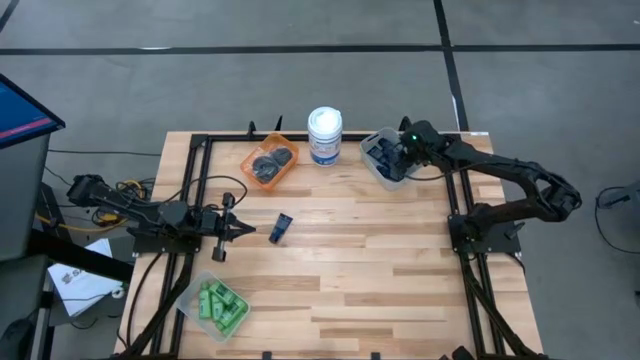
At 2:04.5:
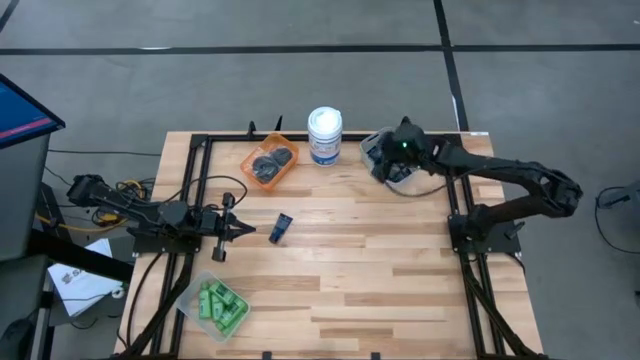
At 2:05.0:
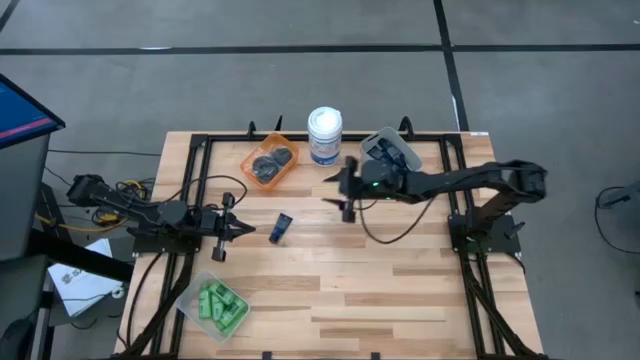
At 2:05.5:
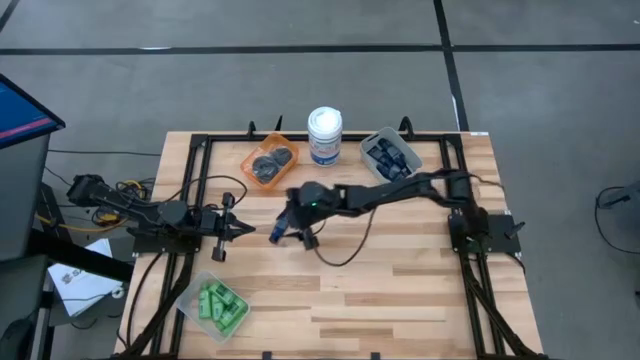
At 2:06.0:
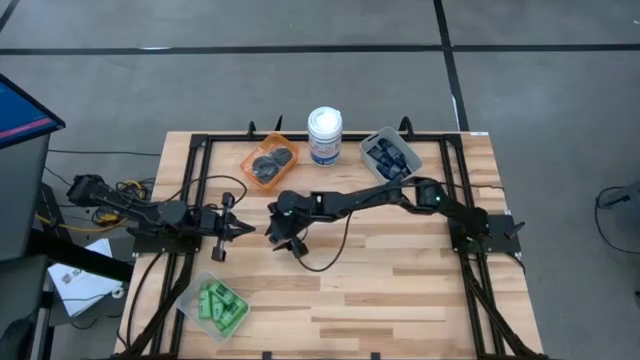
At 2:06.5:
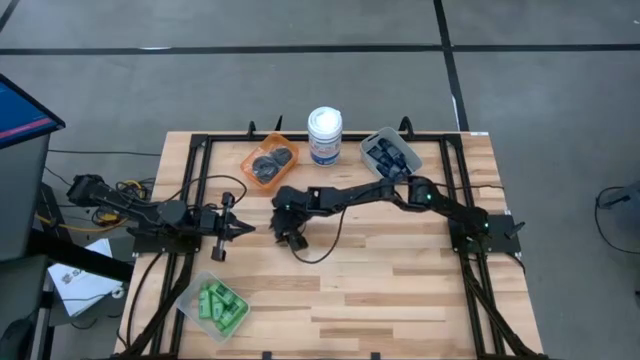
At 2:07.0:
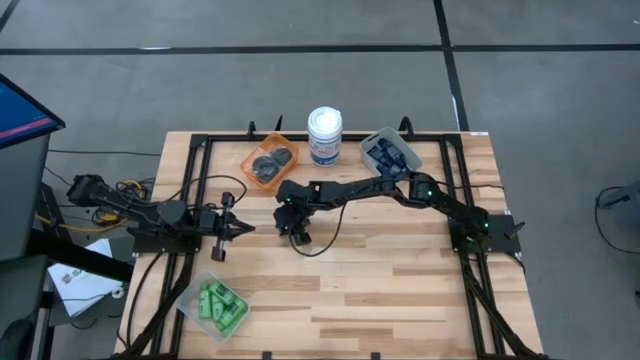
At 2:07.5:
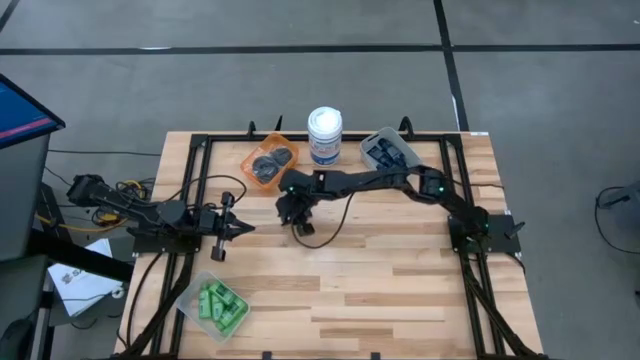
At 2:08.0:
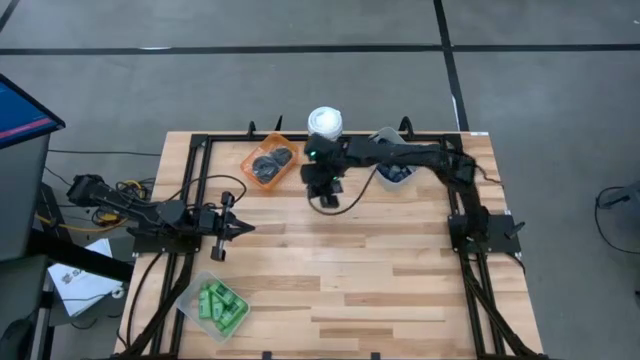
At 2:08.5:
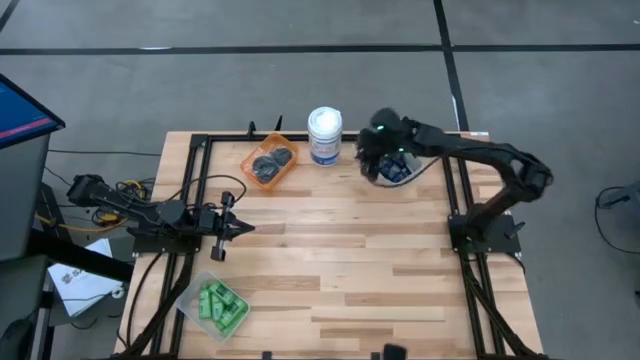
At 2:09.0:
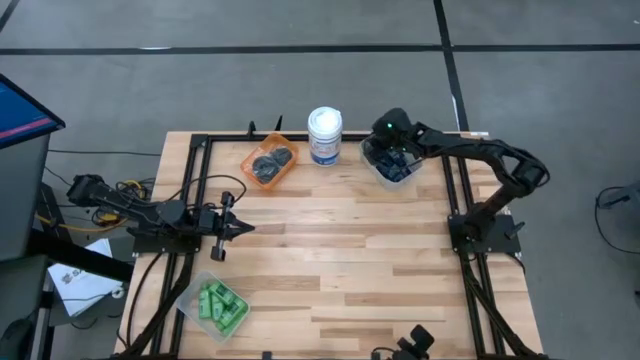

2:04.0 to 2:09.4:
Task: Pick & Place Travel size toiletries
Put the shaving cream into the gray bin

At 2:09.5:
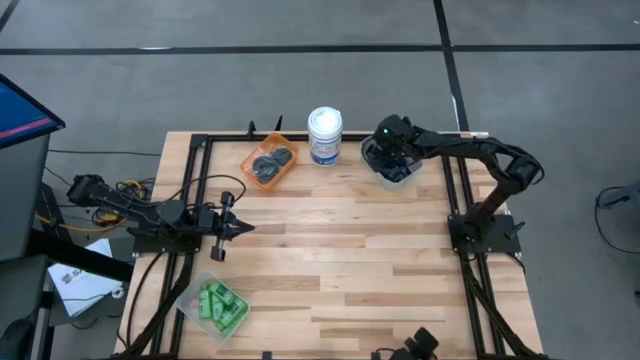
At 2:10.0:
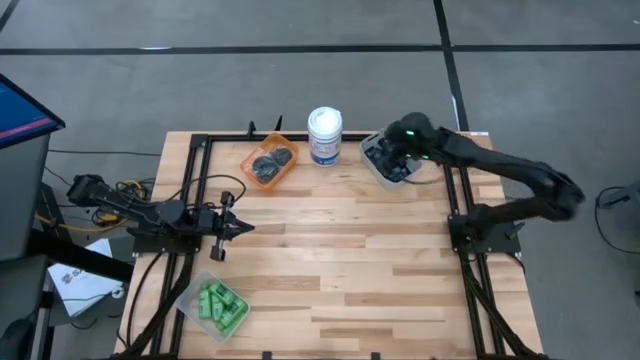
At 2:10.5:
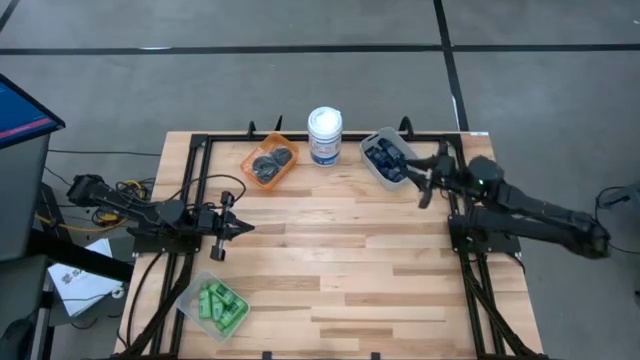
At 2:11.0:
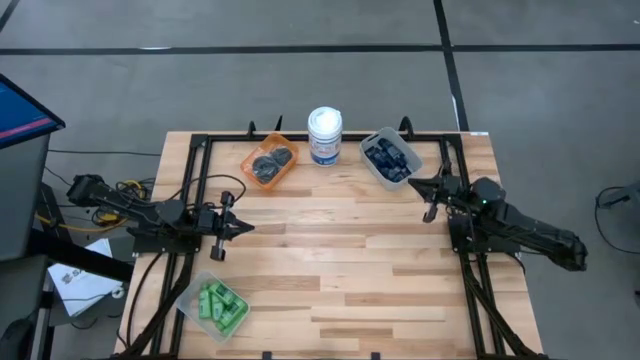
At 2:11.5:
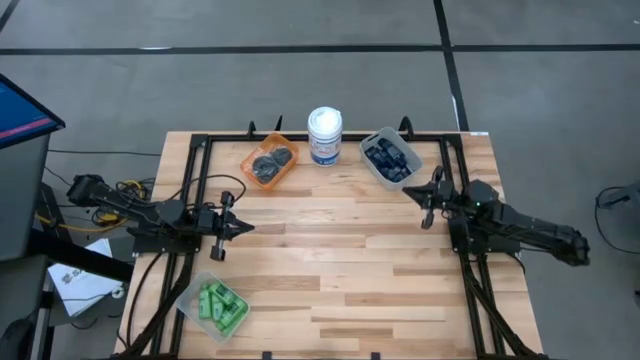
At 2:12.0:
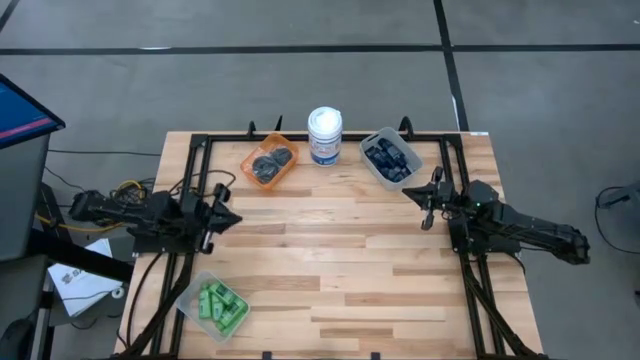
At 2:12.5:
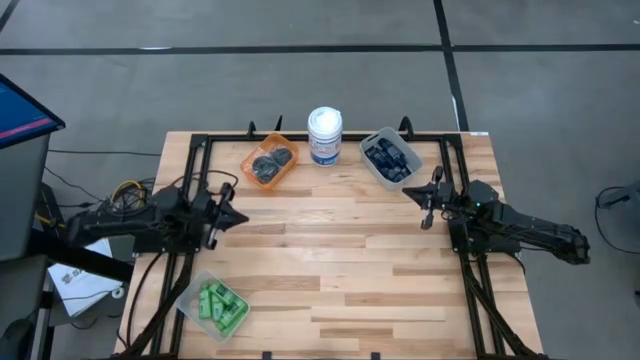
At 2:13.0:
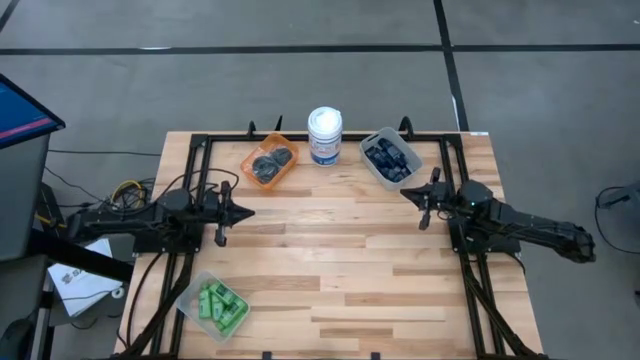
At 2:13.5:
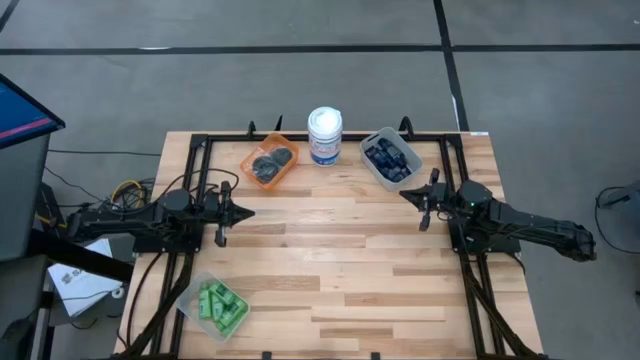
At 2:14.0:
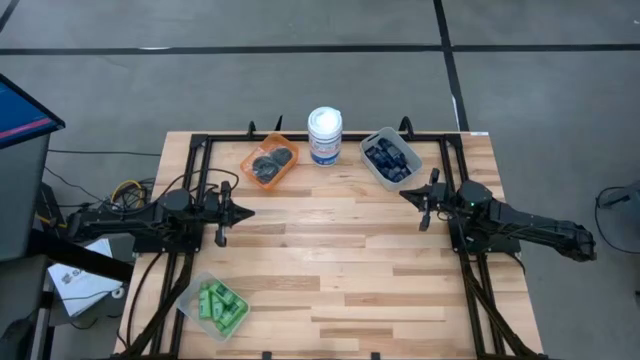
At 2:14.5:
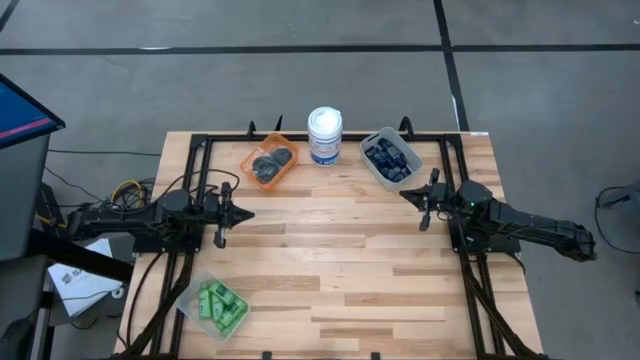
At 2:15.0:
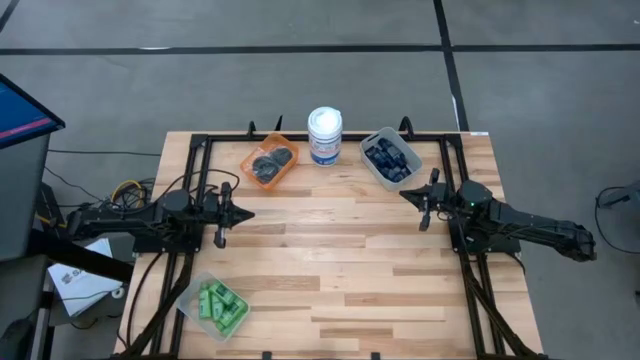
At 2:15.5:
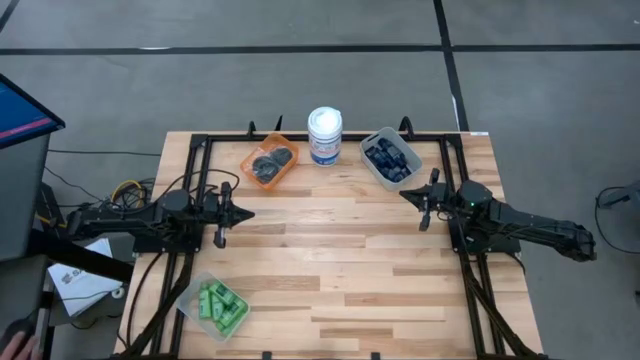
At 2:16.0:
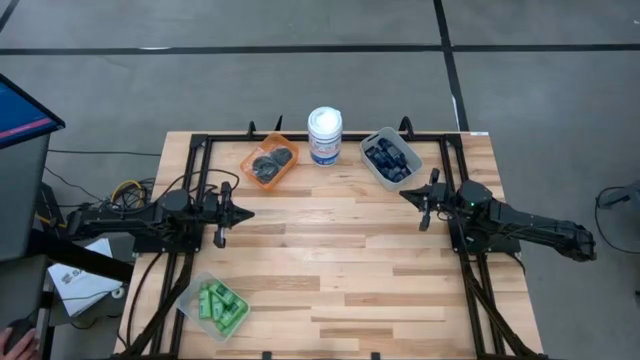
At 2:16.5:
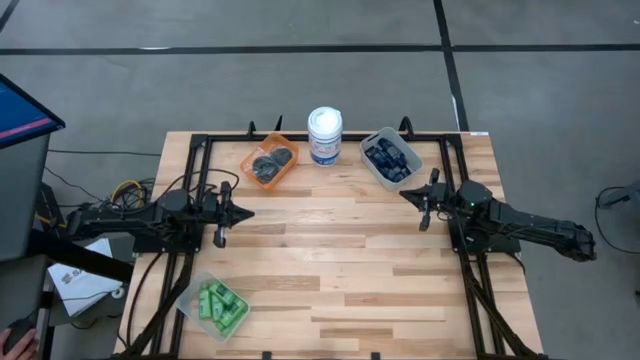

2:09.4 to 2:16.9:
Return to Home Position
